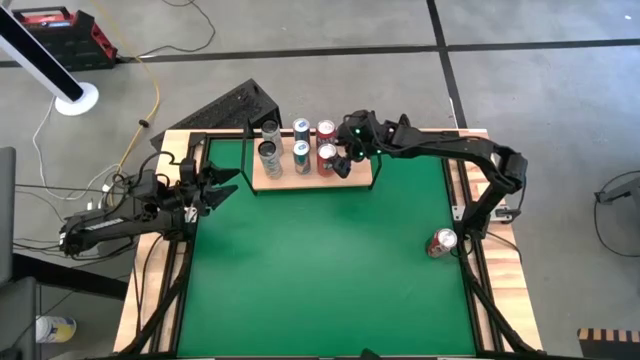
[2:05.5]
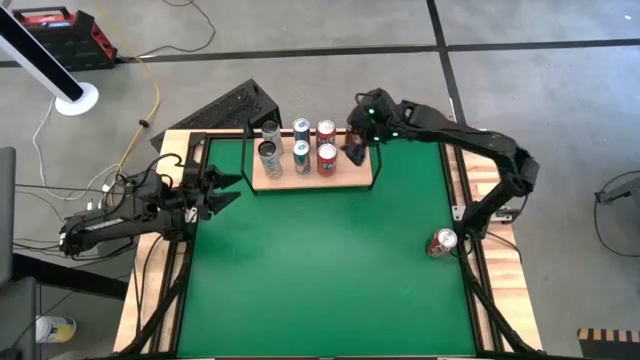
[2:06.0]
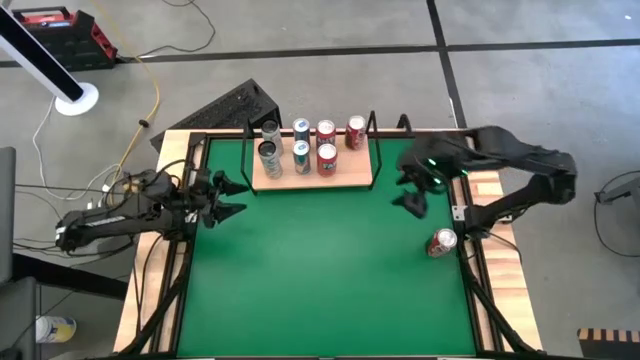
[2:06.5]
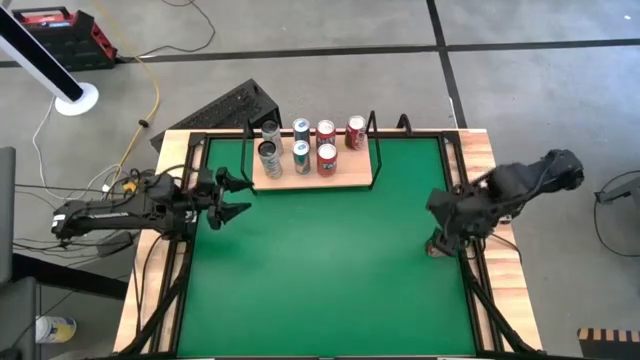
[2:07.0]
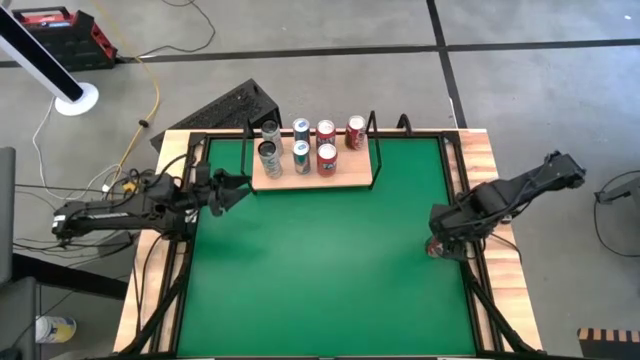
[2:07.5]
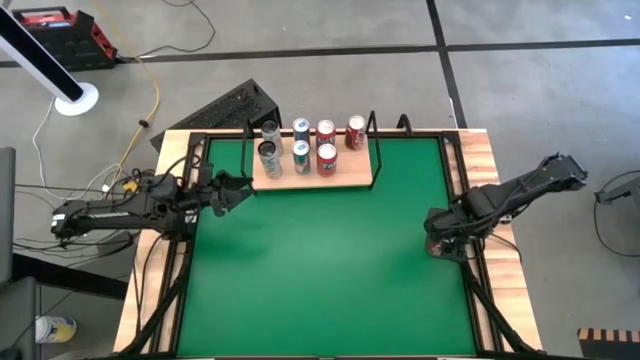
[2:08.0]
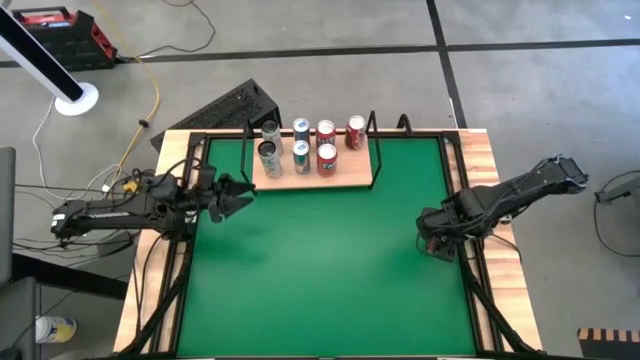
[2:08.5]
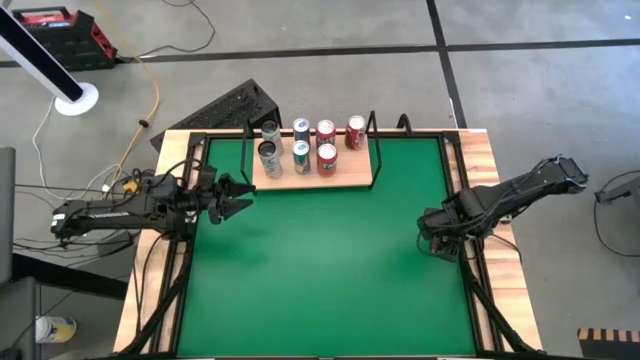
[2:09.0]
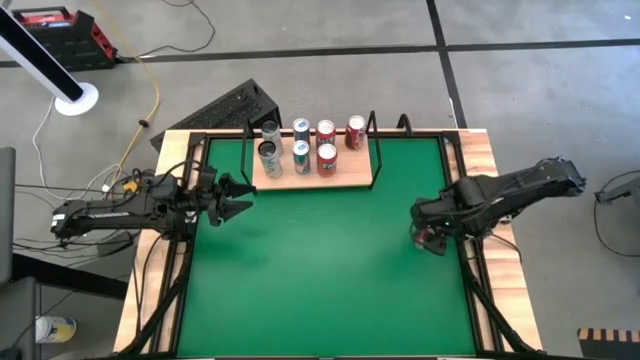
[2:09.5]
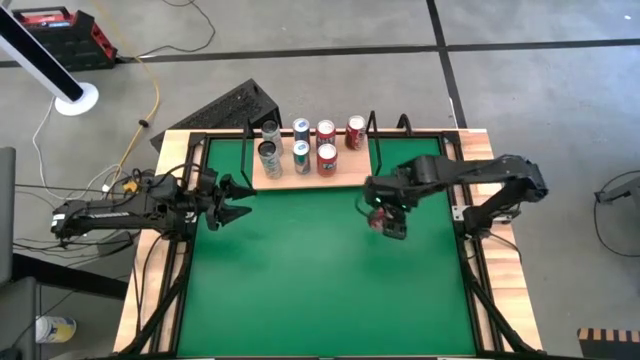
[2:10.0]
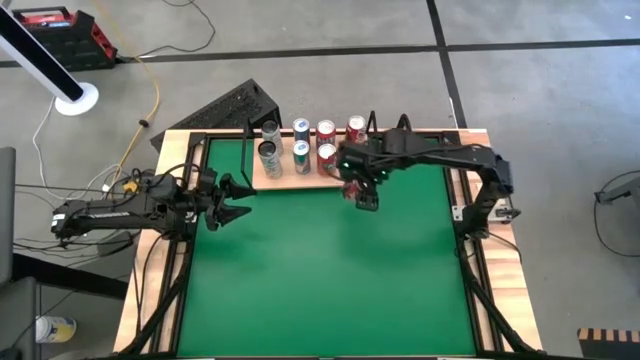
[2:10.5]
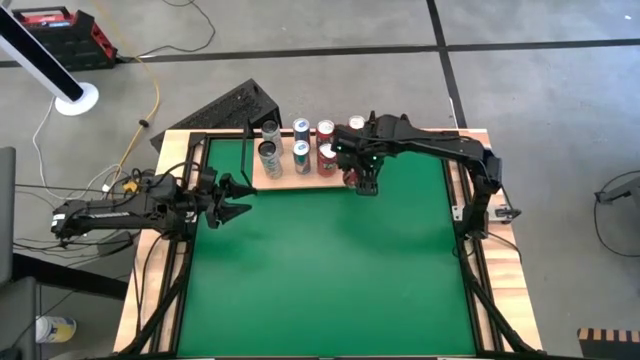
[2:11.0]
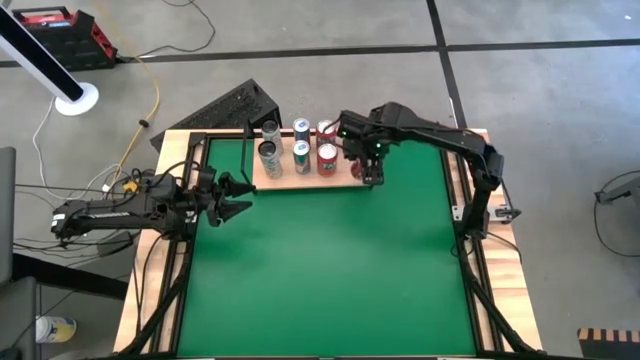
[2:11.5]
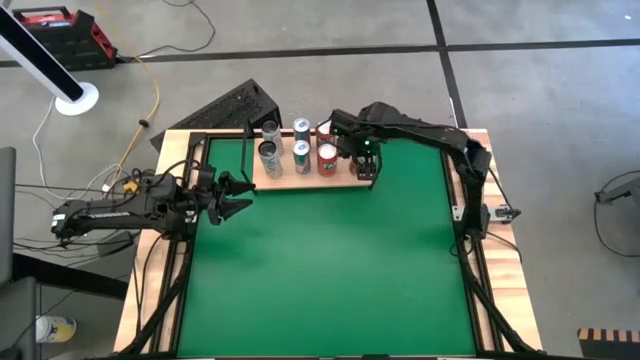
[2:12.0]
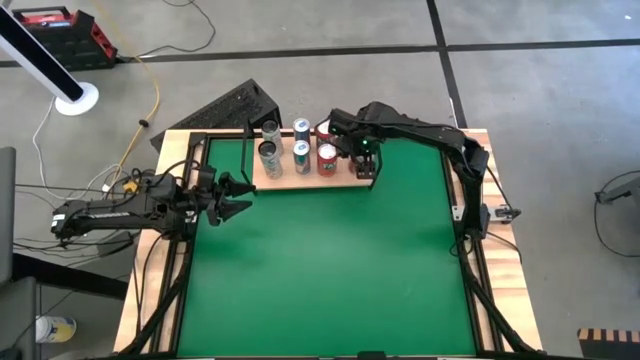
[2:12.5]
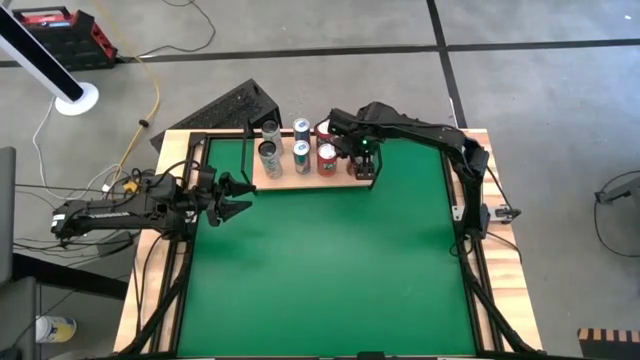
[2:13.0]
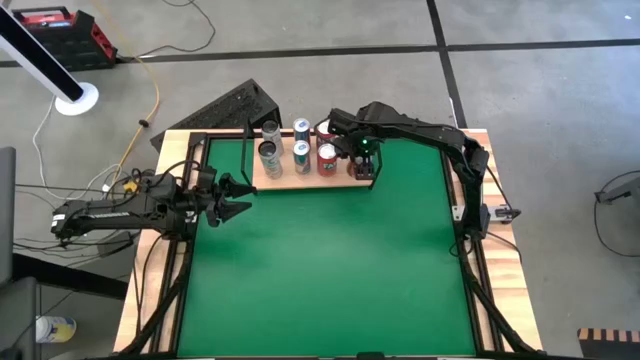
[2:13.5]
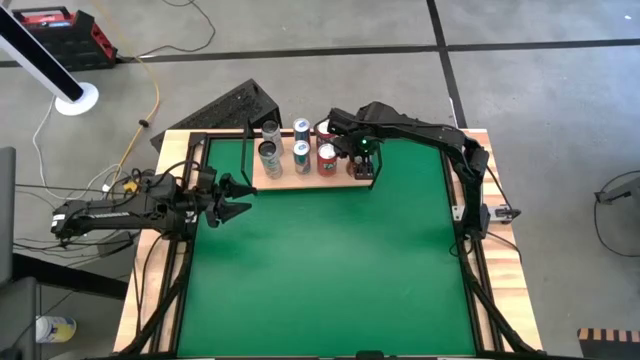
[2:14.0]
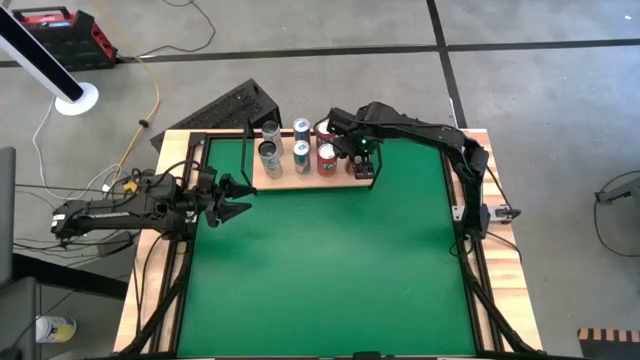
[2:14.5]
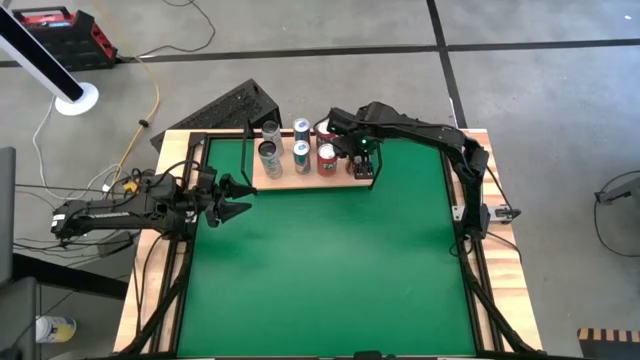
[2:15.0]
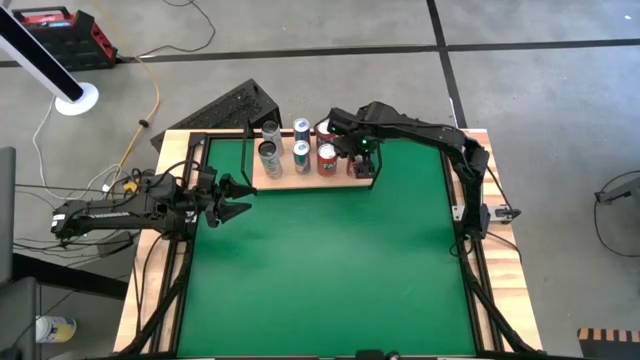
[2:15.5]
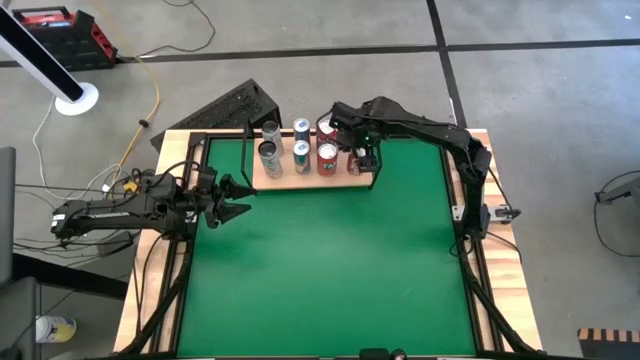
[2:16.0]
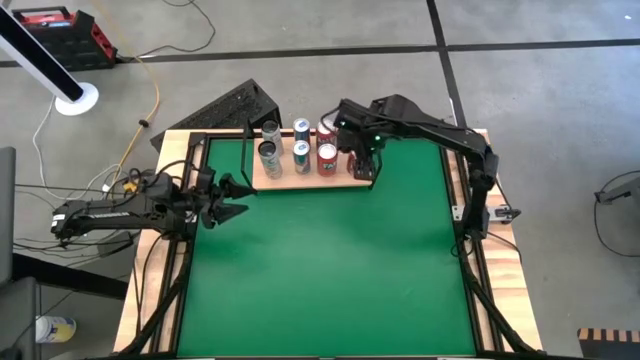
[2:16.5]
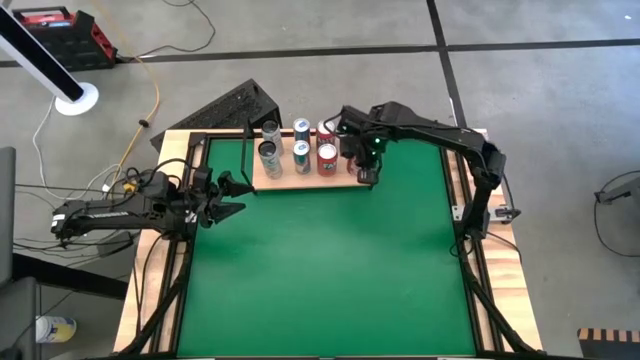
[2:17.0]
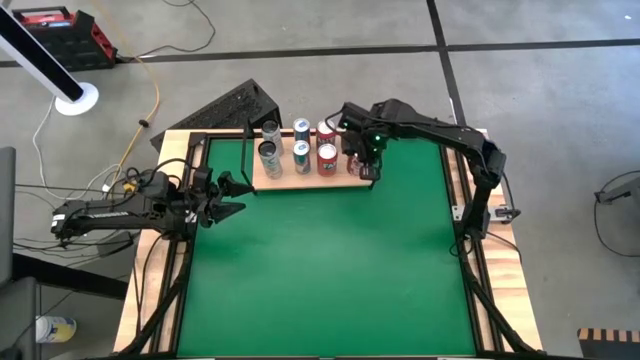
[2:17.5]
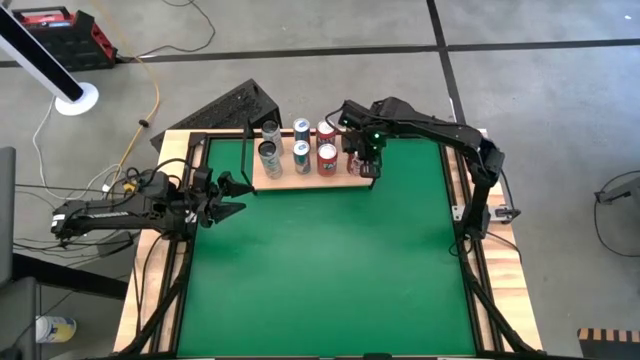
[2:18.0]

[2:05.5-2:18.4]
Task: Place canned beverage on shelf
Put the red soda can on the shelf aligned with the other red soda can

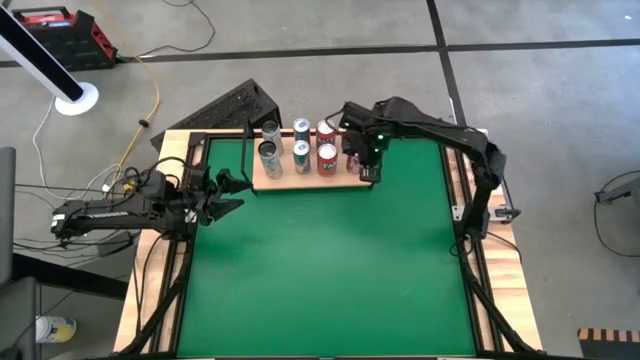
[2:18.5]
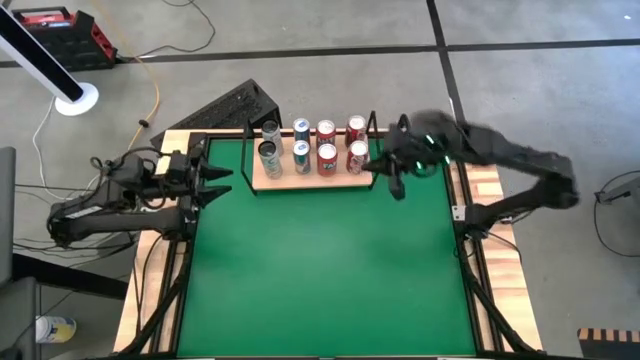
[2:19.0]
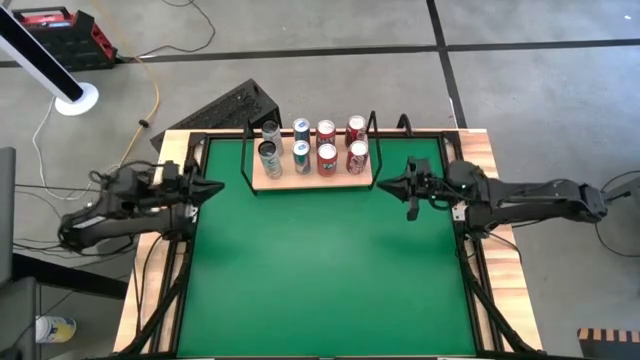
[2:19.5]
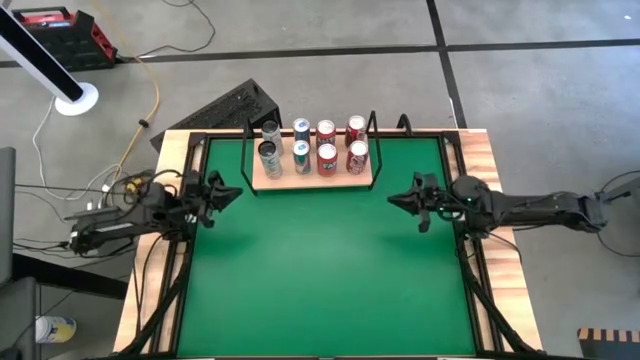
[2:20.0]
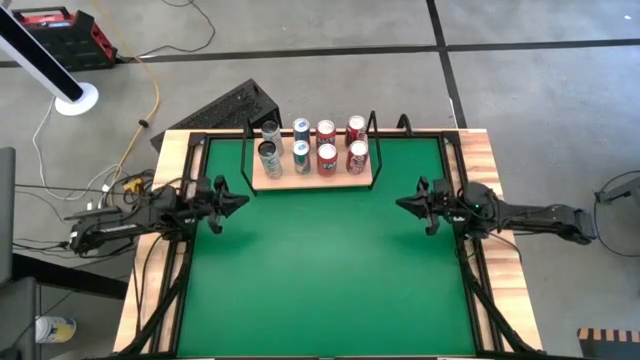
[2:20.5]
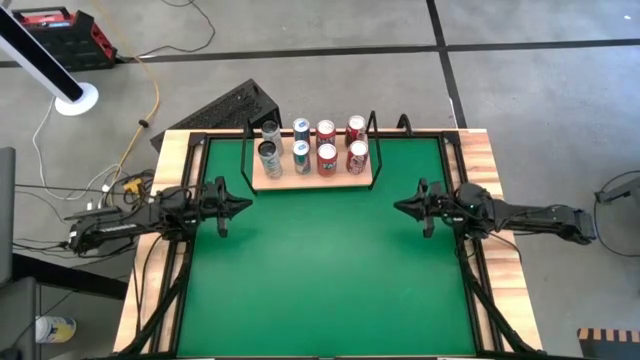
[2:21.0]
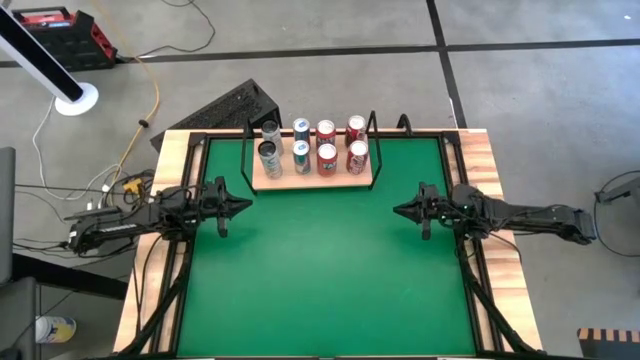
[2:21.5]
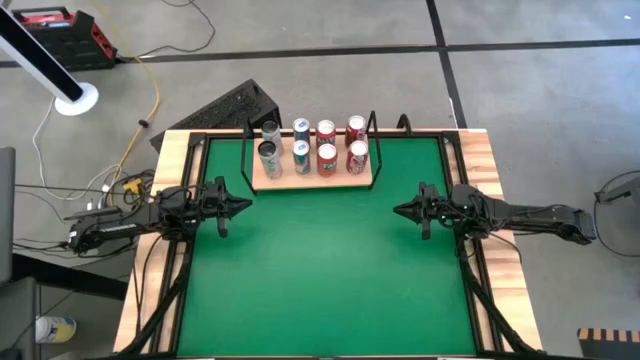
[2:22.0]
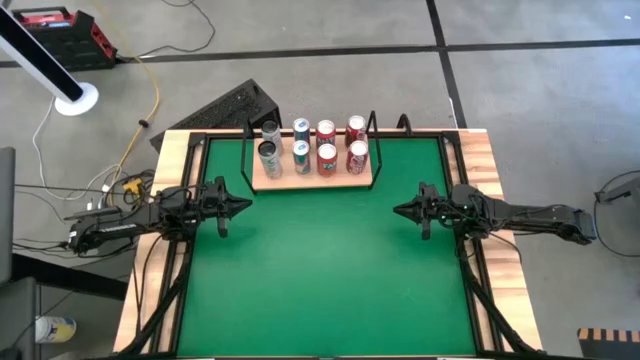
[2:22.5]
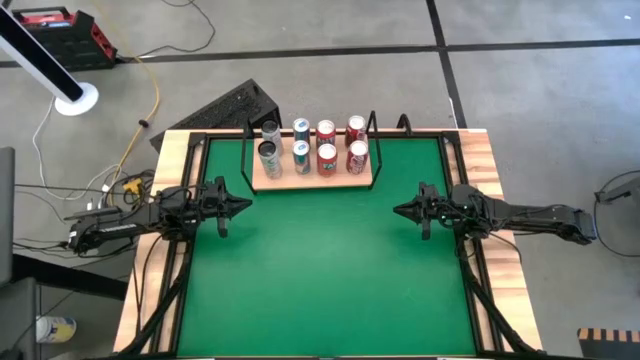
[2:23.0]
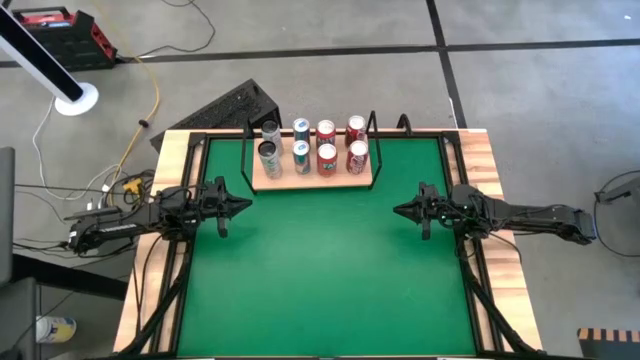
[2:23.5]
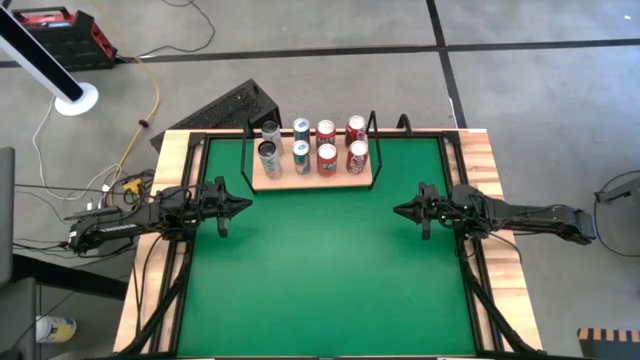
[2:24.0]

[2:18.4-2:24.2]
Return to Home Position
